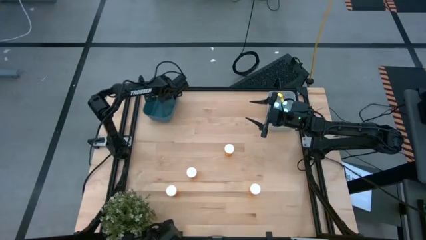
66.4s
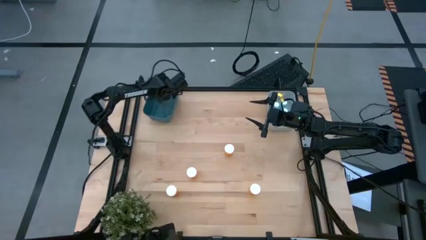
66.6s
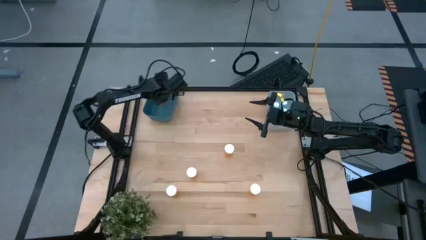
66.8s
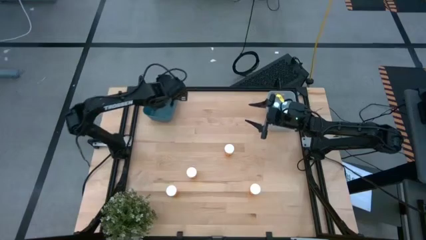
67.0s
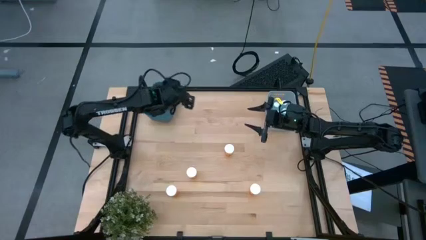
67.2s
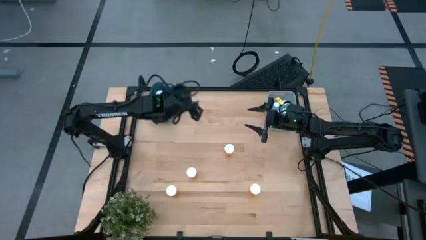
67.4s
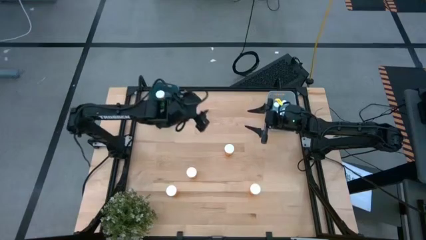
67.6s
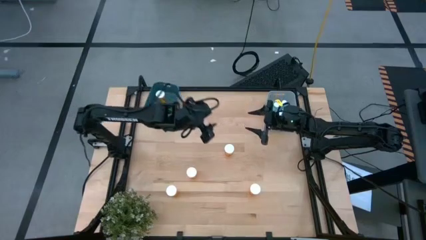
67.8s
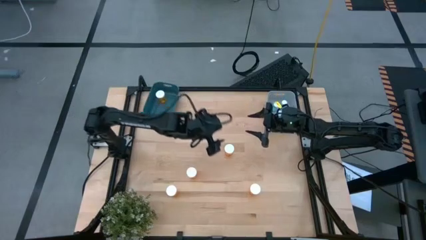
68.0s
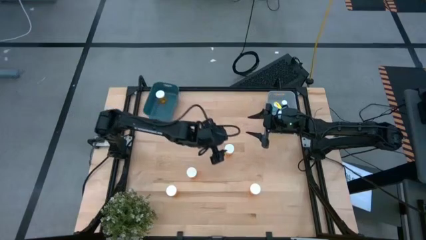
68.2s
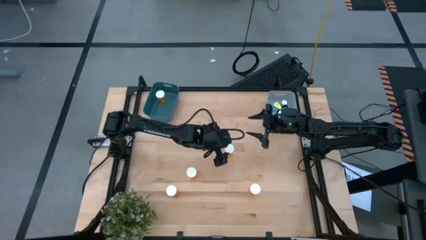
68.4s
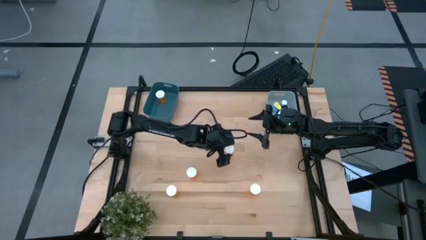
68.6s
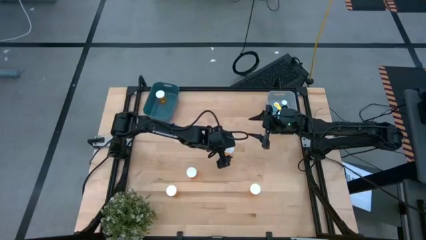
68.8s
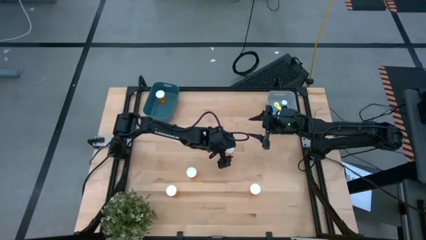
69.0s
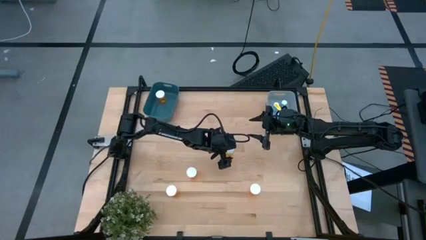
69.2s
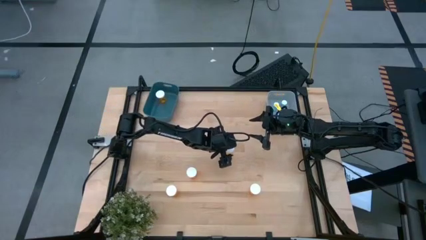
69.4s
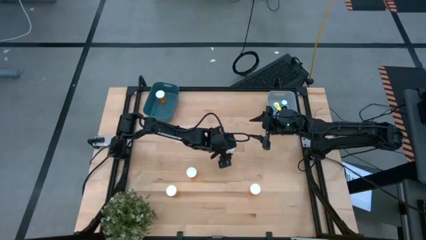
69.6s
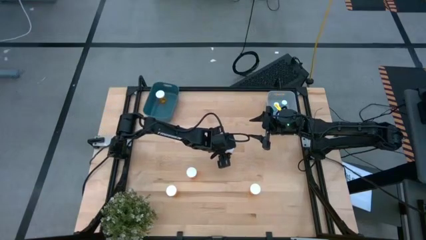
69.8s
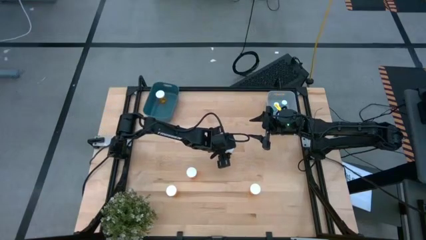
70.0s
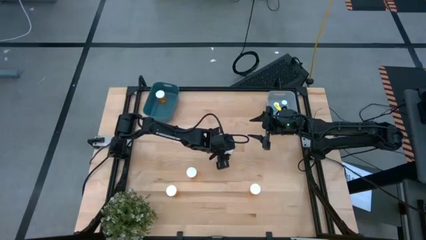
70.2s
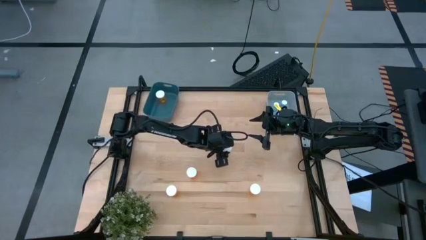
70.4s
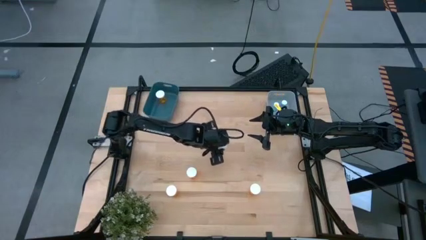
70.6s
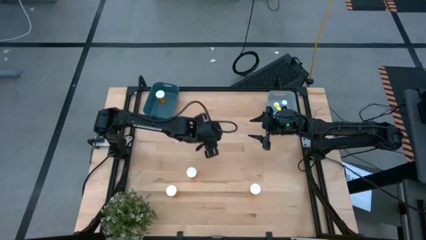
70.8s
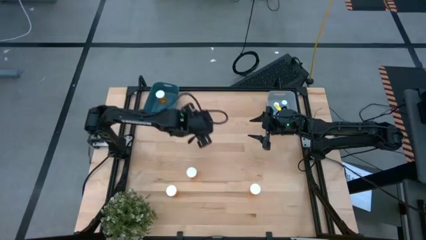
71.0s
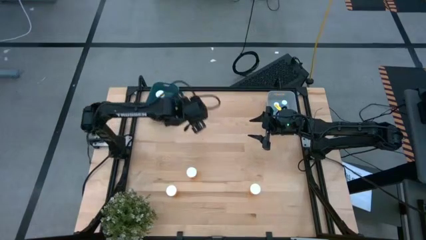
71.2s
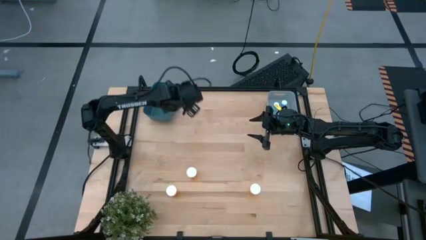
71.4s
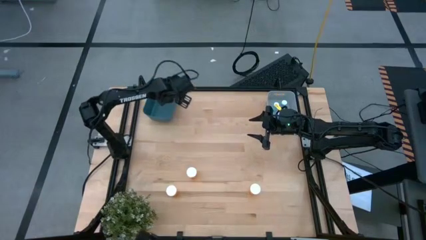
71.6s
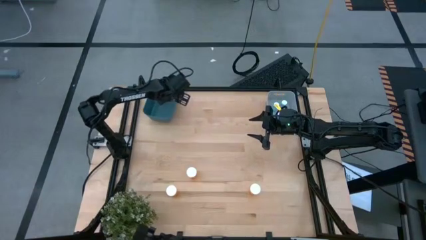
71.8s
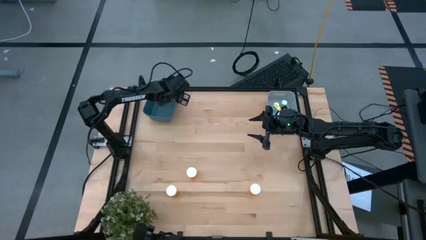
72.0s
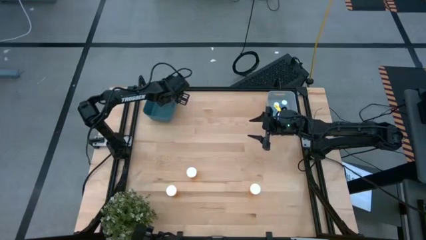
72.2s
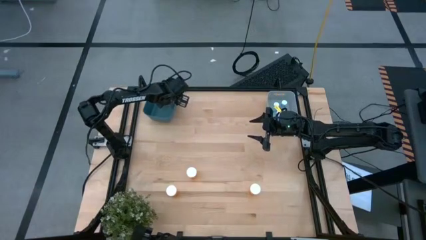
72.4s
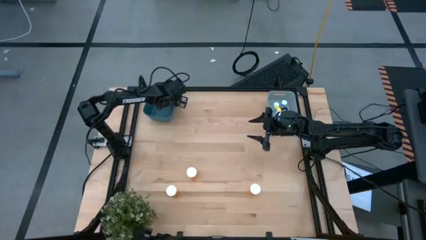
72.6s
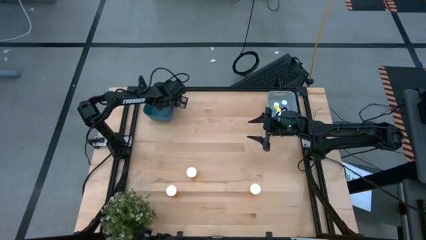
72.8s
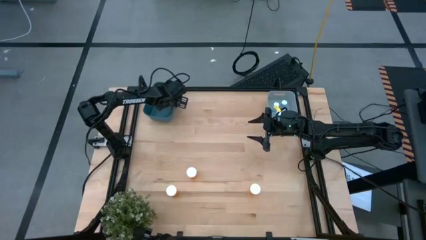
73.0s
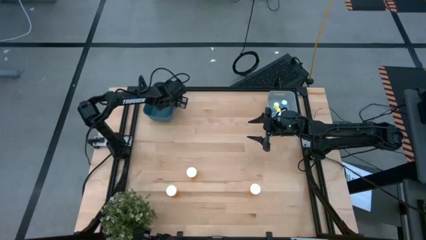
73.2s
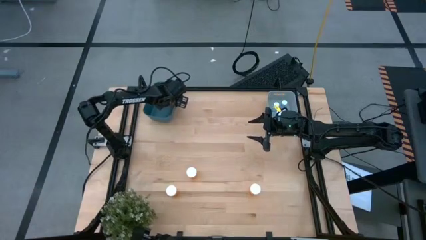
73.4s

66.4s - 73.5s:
Task: Pick and place medicine bottles into bin by pill shape (circle, oval)
Put the orange capsule bottle into the blue bin

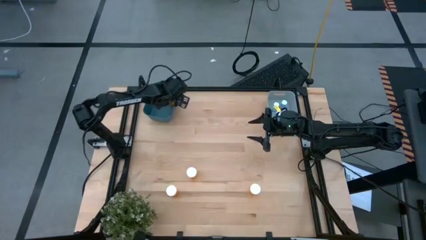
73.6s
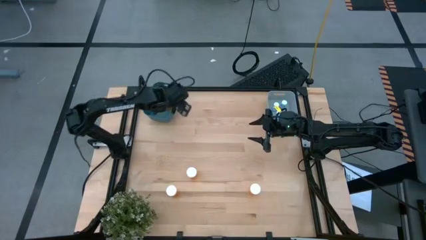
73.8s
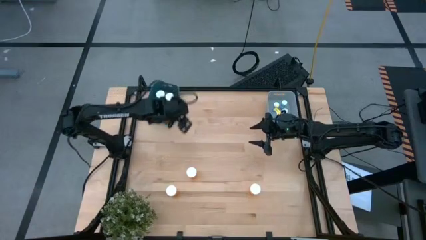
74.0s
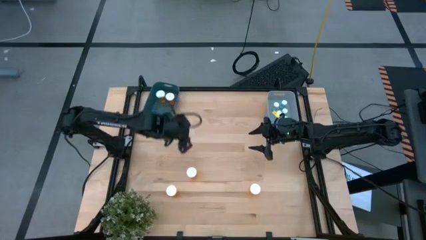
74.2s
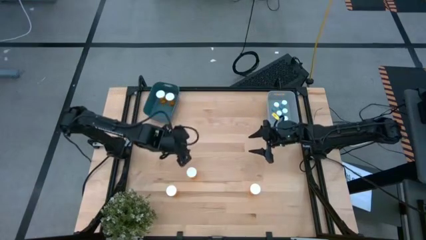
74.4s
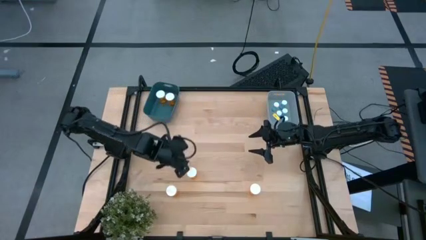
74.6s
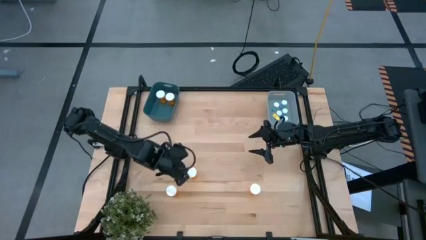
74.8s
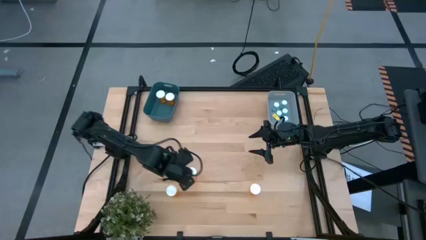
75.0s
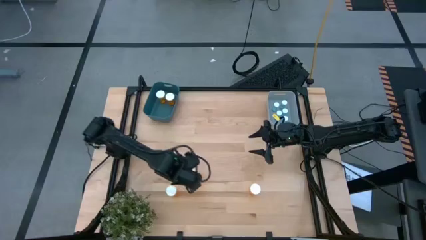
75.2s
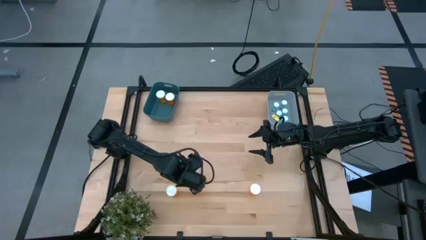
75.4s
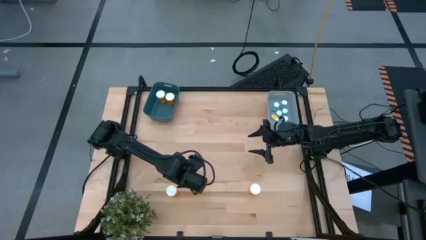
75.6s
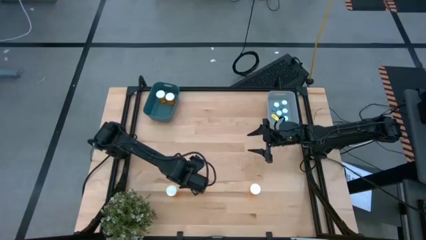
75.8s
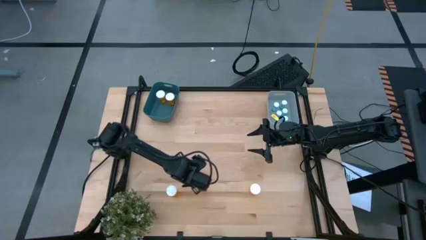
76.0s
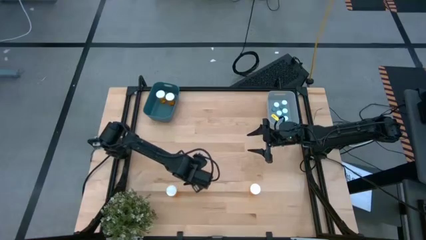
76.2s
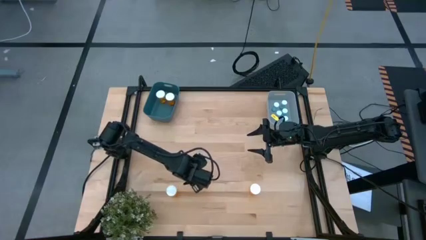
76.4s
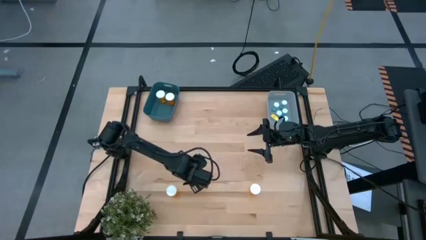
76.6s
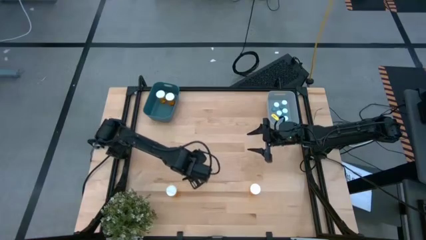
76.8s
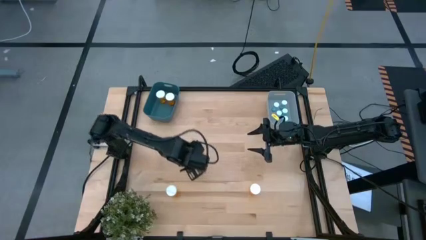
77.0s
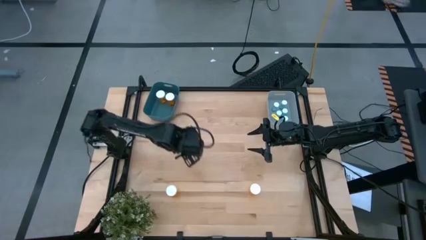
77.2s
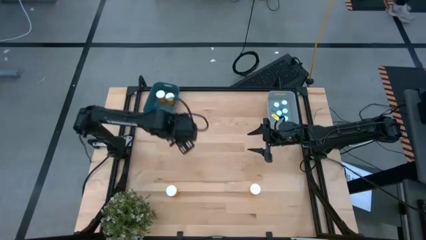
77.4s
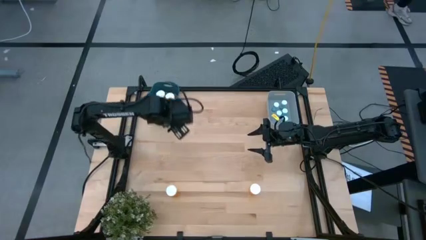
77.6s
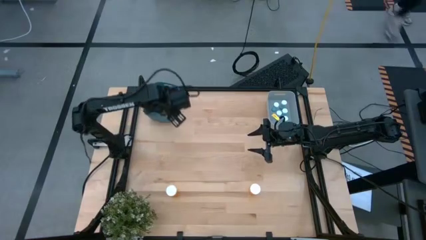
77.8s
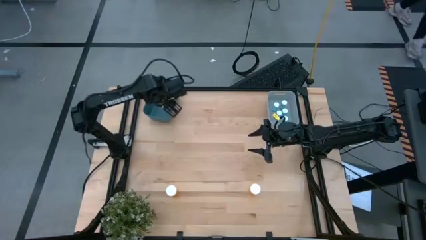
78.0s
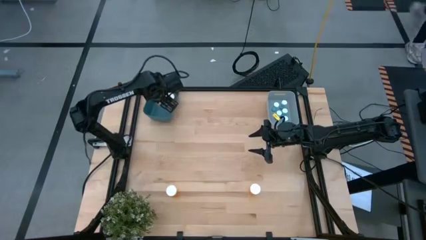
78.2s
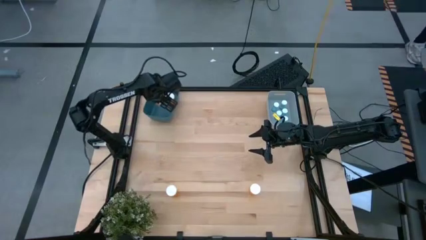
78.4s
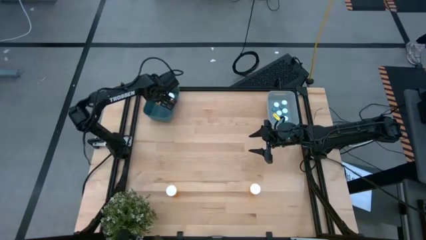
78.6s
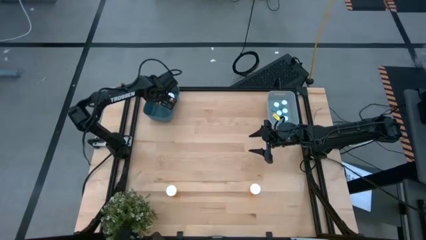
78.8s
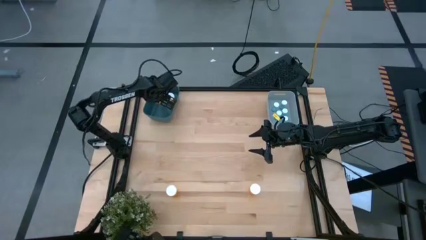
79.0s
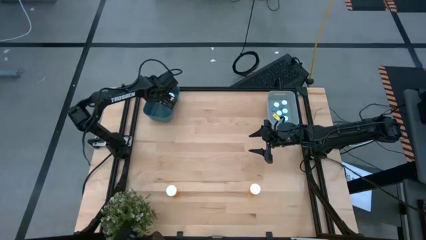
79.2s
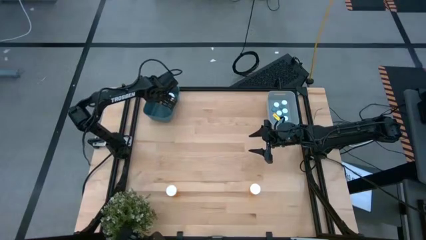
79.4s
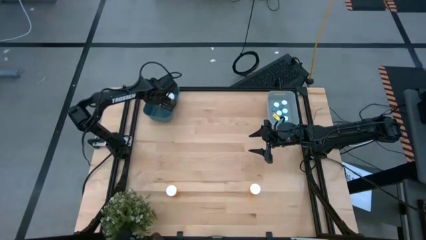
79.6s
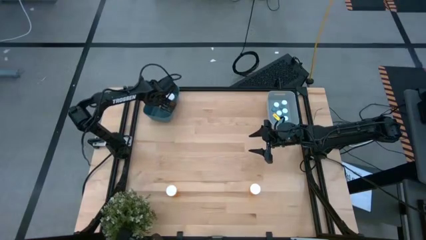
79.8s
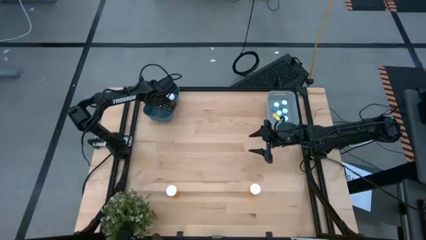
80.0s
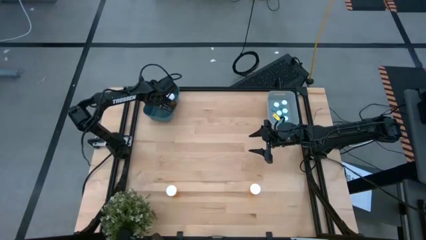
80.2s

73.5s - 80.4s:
Put the orange capsule bottle into the blue bin

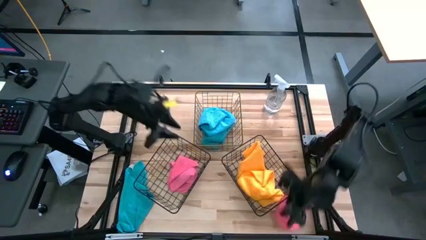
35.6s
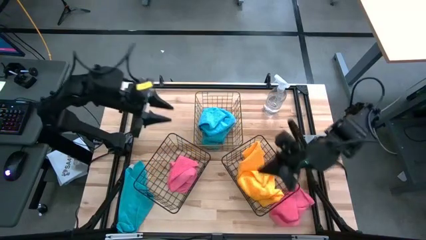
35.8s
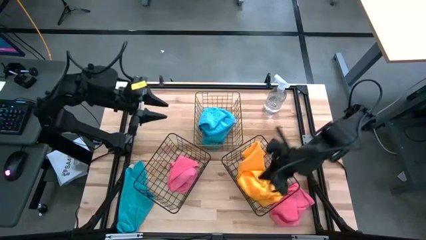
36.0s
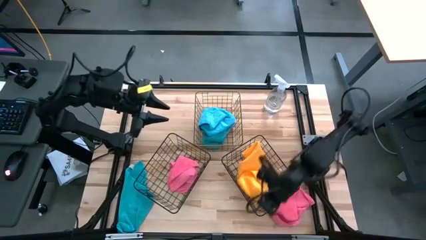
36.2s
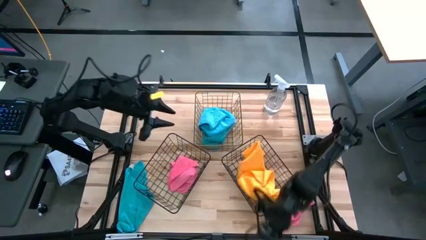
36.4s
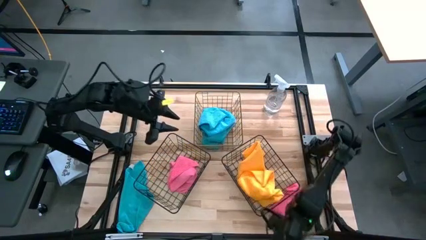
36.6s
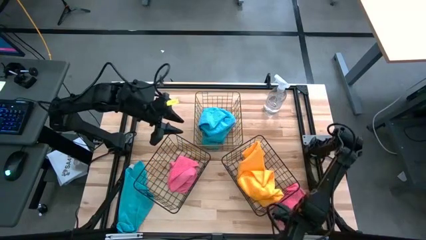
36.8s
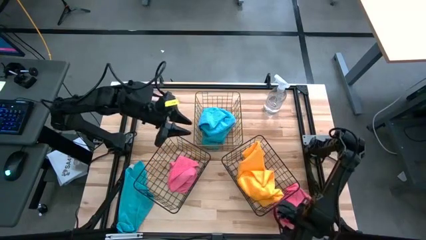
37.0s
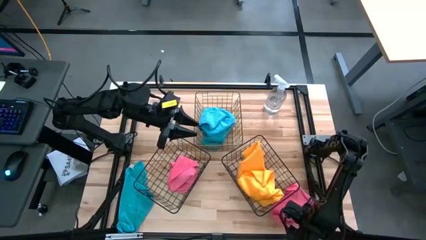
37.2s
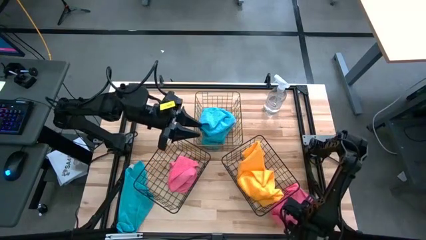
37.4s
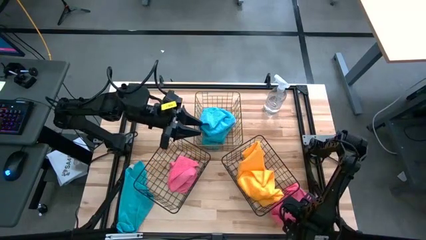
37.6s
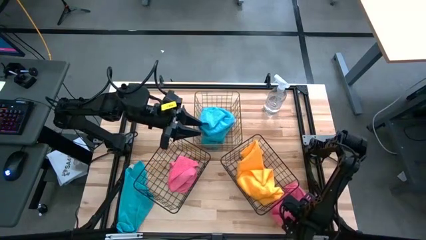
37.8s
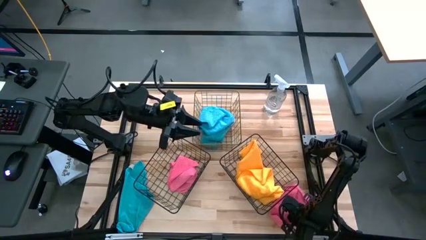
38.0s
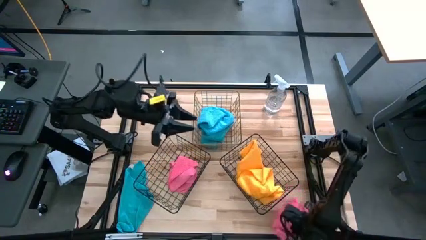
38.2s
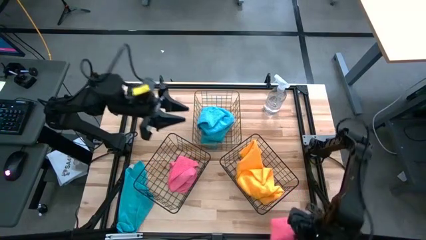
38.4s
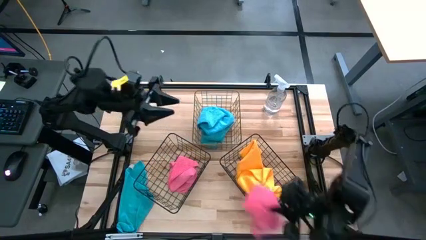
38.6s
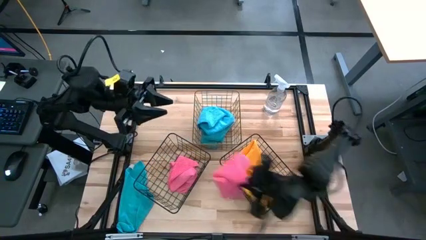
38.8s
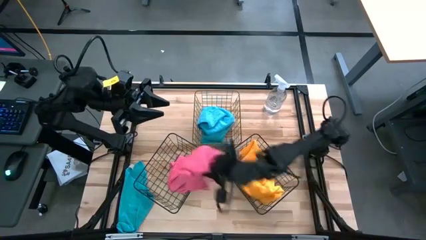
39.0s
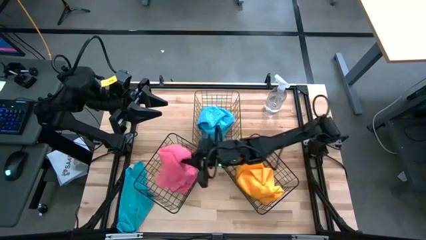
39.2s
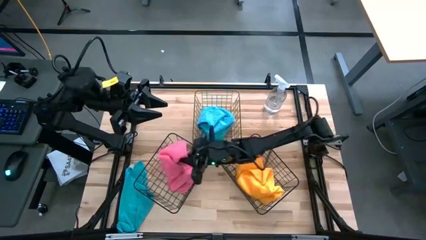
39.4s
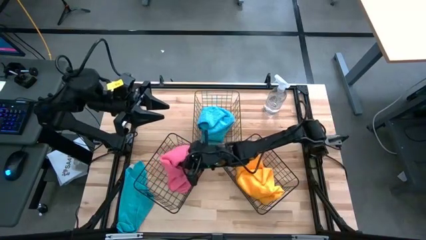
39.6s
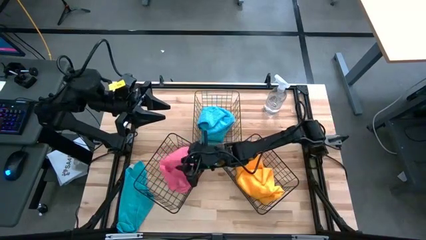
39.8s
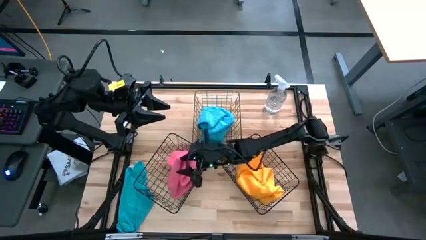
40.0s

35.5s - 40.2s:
Task: Sort microfiber towel by color & place in baskets
Put the pink microfiber cloth into the bottom left wire basket
